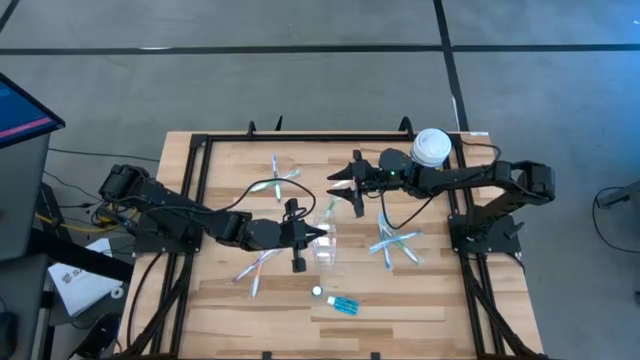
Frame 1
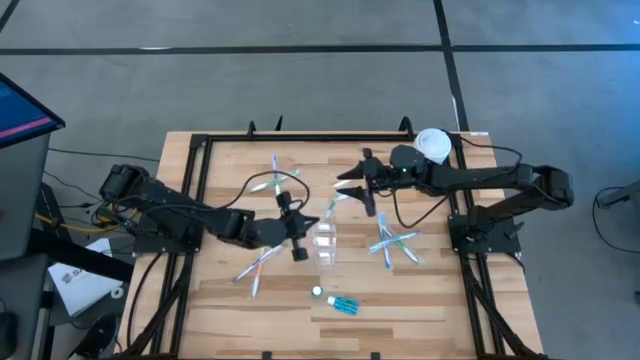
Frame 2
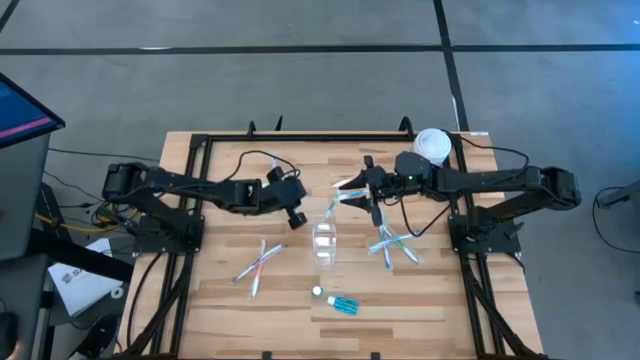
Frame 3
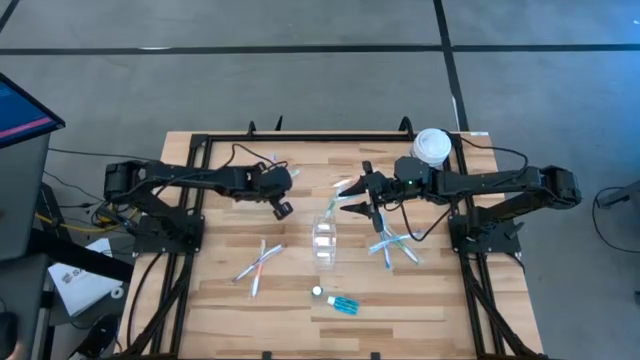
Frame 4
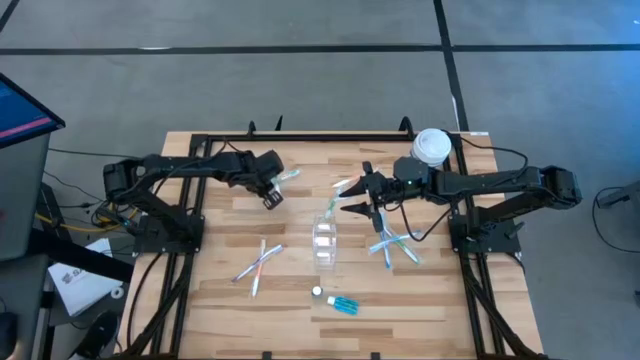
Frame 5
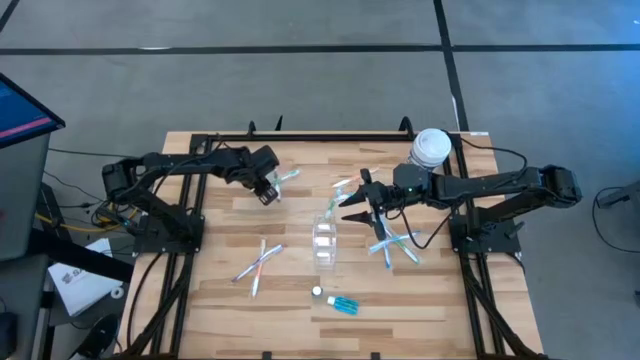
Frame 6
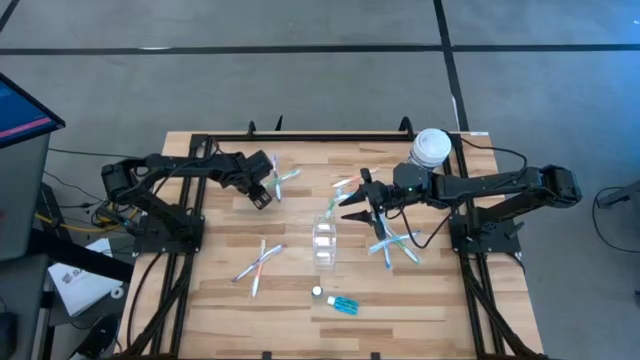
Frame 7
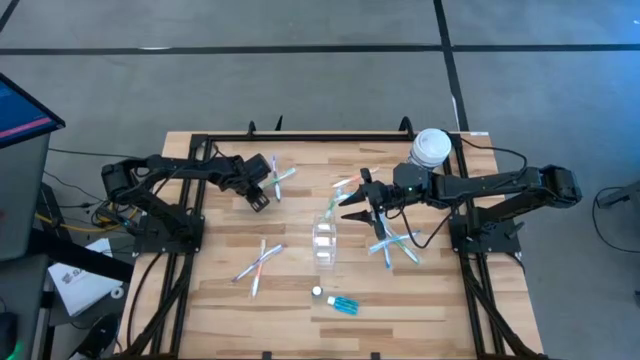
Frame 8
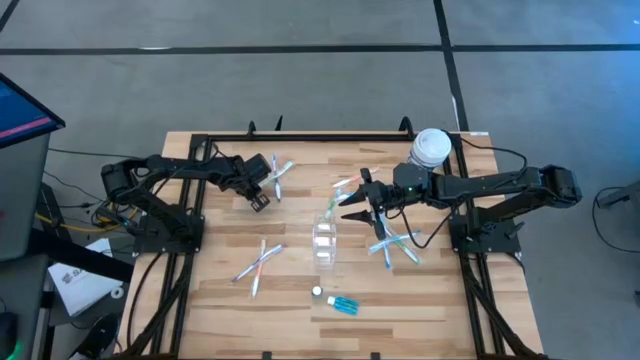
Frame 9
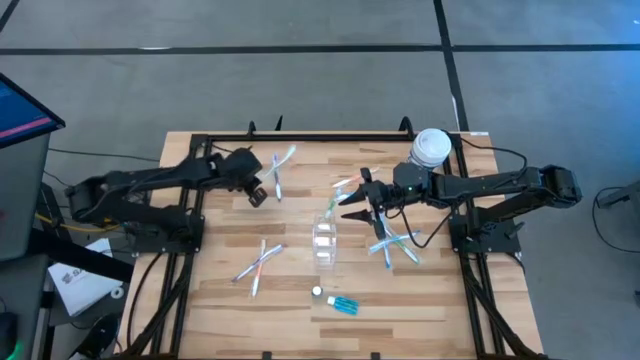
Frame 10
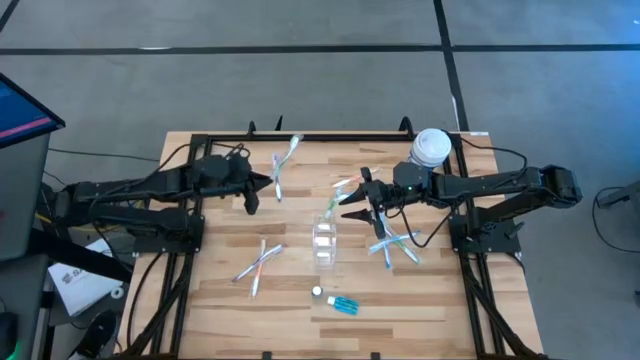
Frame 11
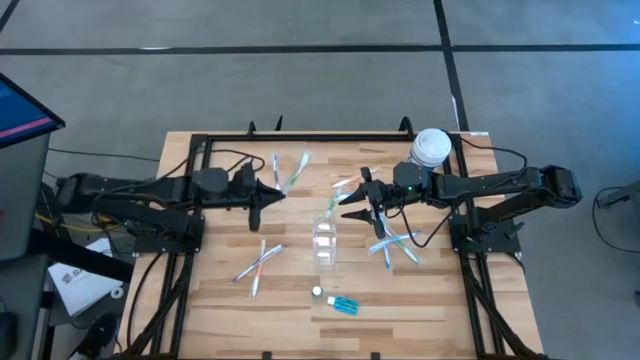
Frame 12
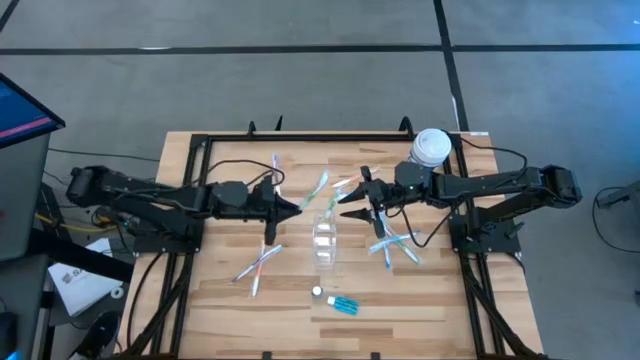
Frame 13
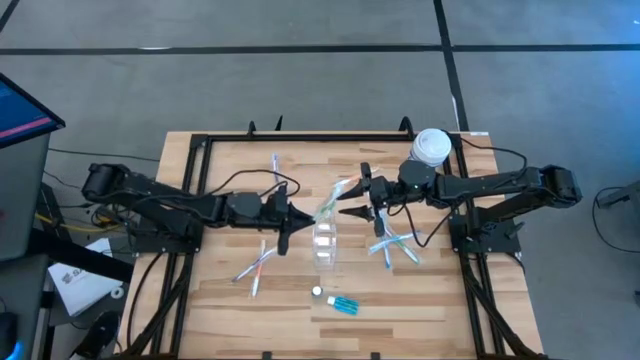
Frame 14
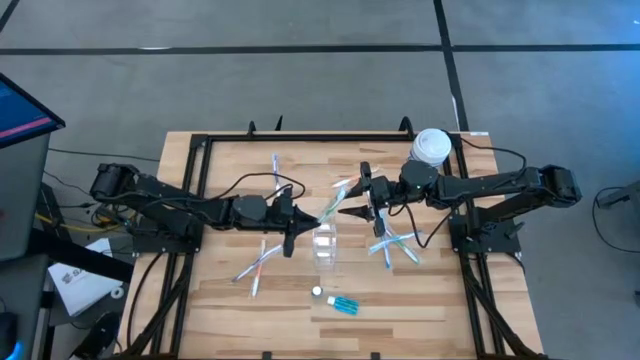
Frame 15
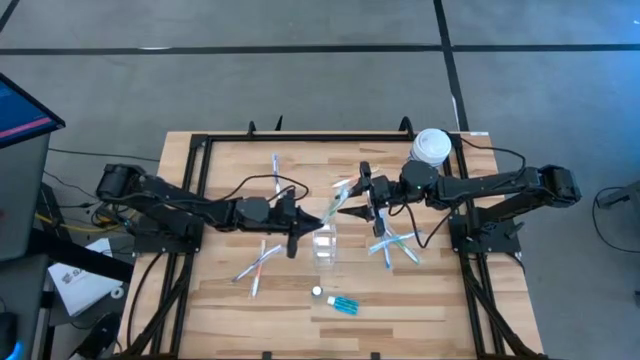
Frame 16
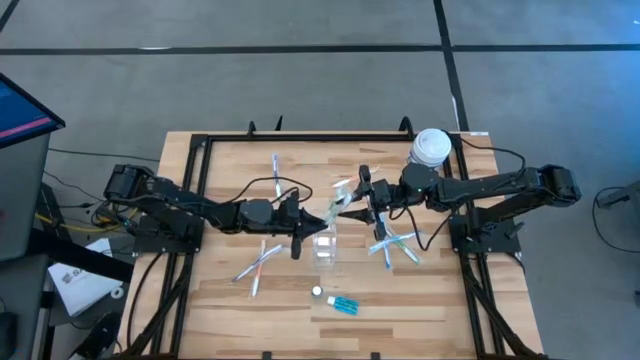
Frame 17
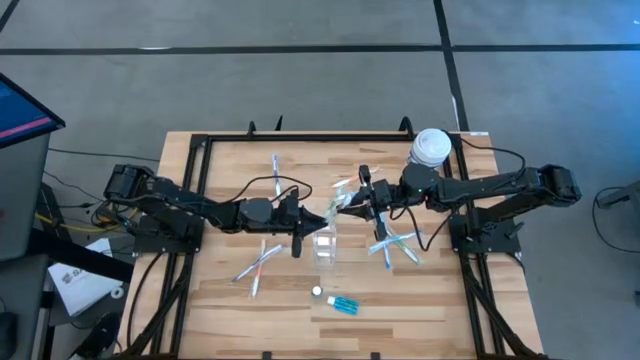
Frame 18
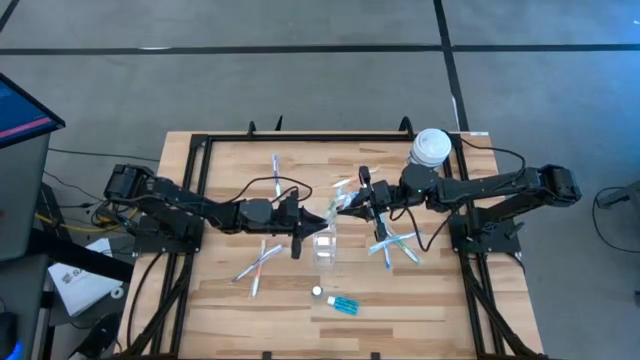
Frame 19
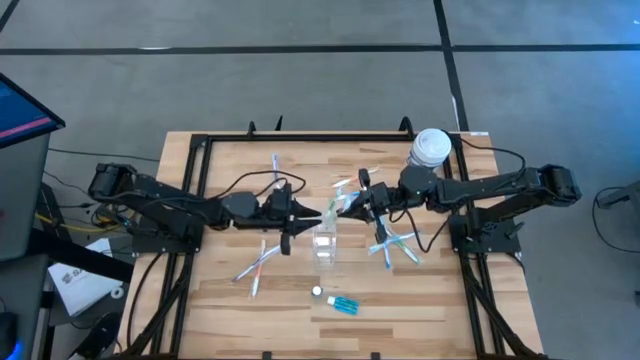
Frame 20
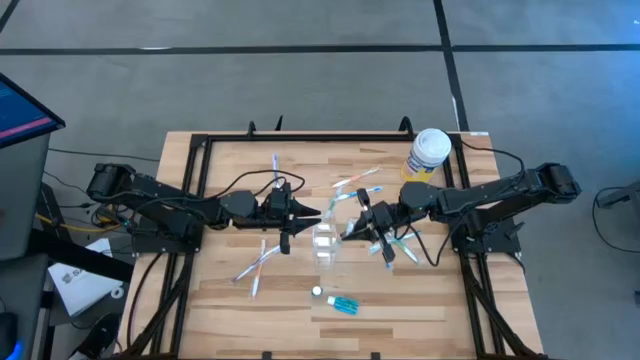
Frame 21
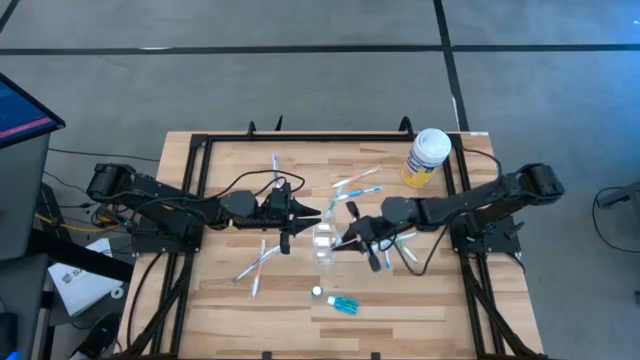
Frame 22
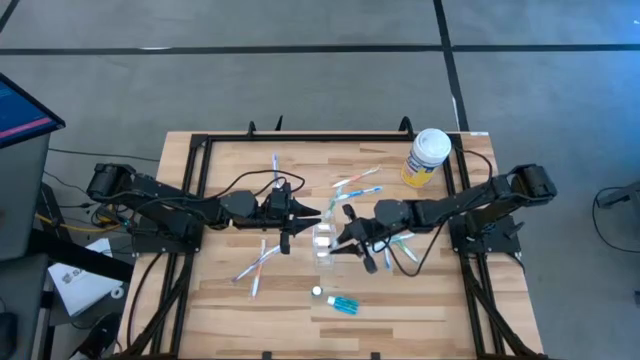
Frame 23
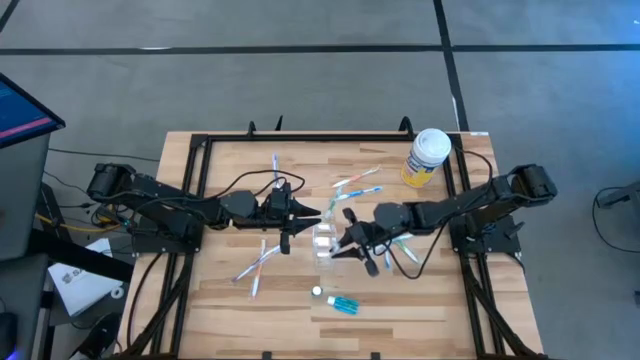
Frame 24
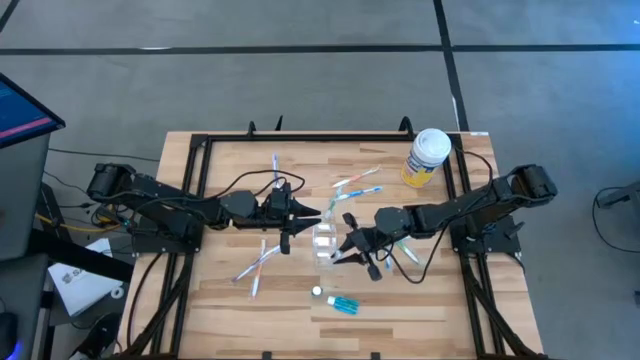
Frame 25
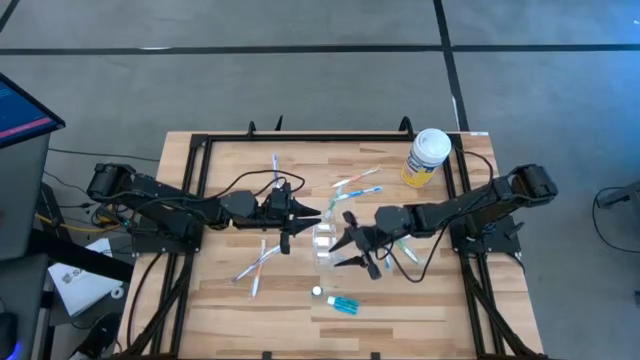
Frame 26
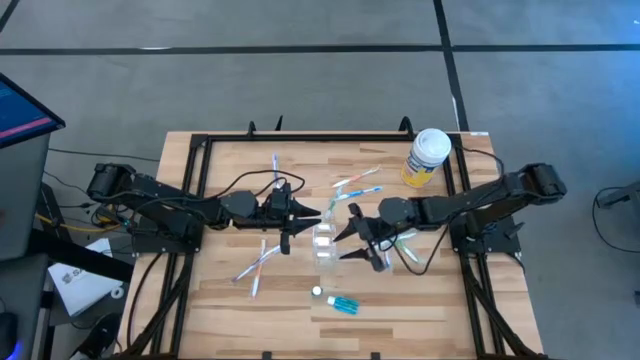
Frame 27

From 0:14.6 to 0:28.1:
Task: Pick & Place toothbrushing station
Put the top green toothbrush into the transparent organizer

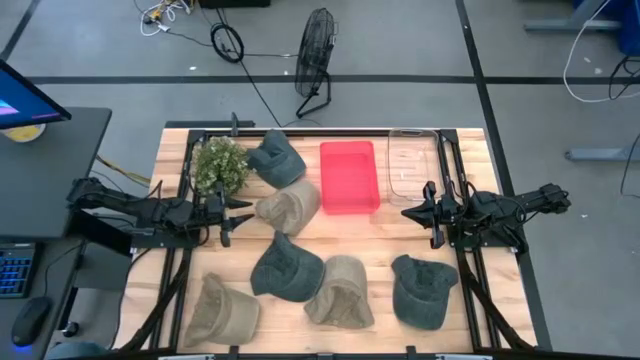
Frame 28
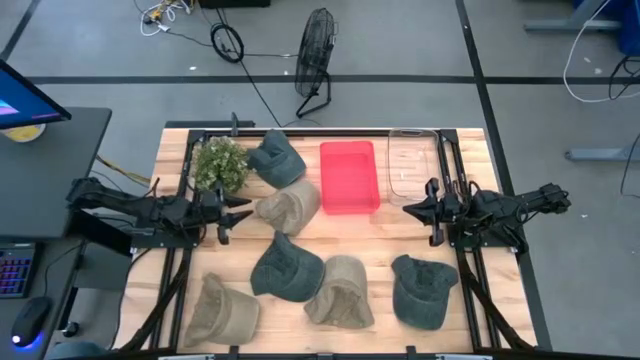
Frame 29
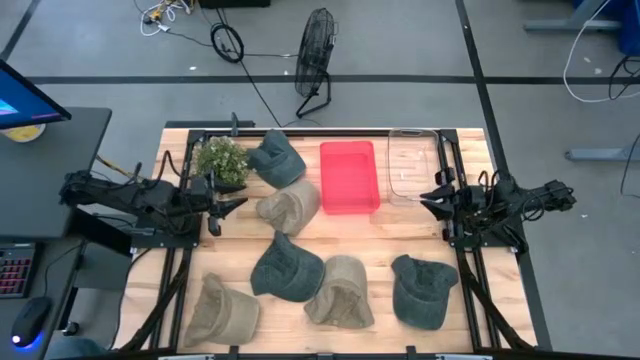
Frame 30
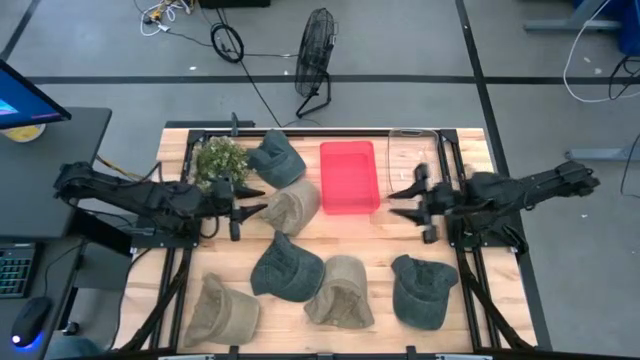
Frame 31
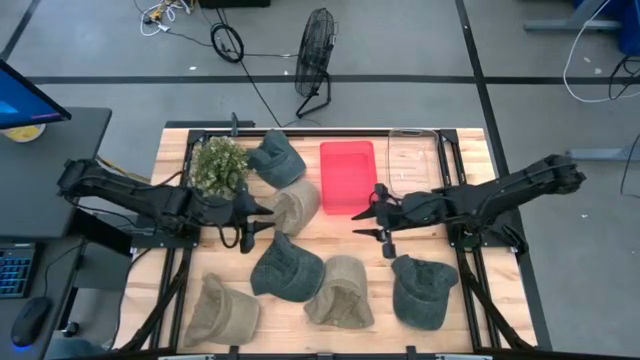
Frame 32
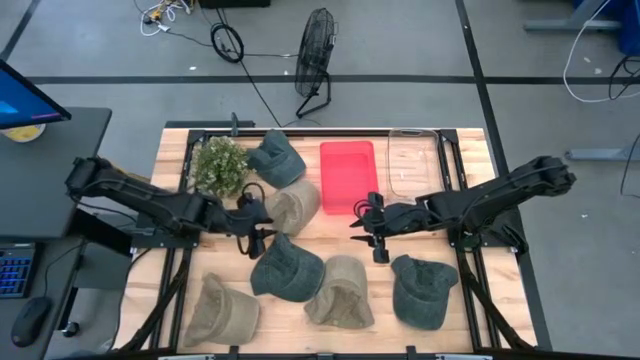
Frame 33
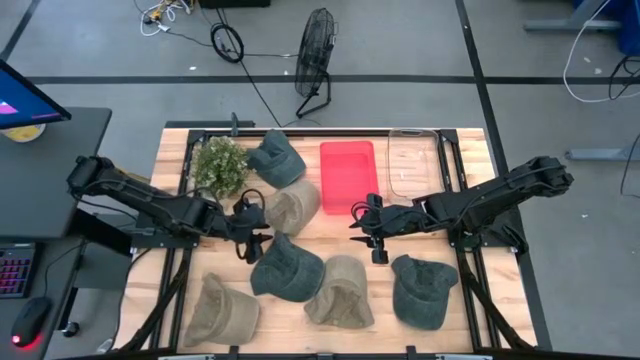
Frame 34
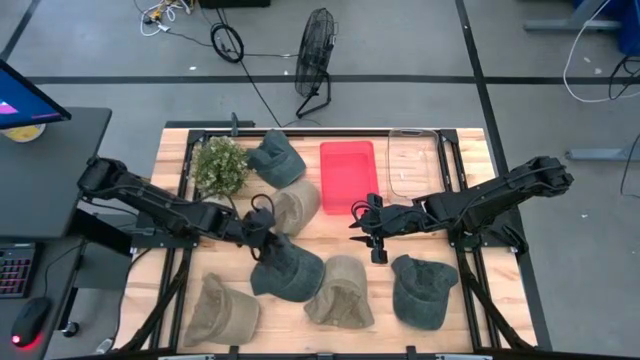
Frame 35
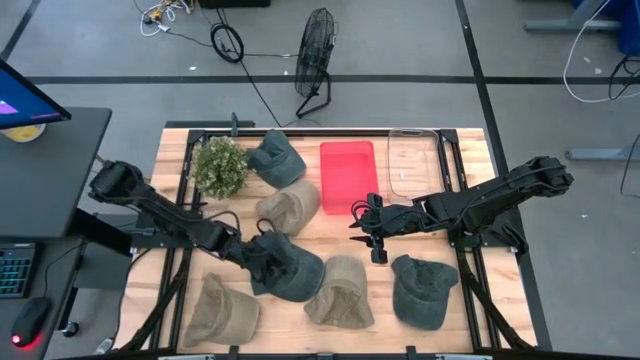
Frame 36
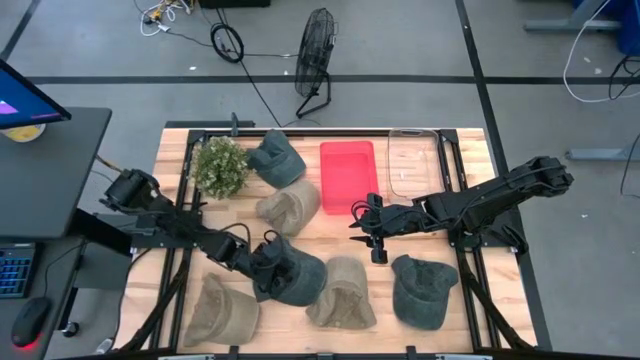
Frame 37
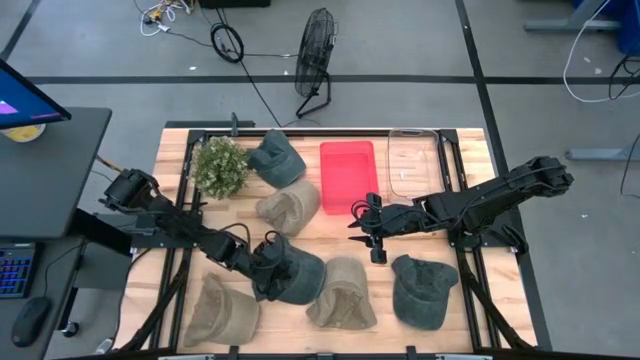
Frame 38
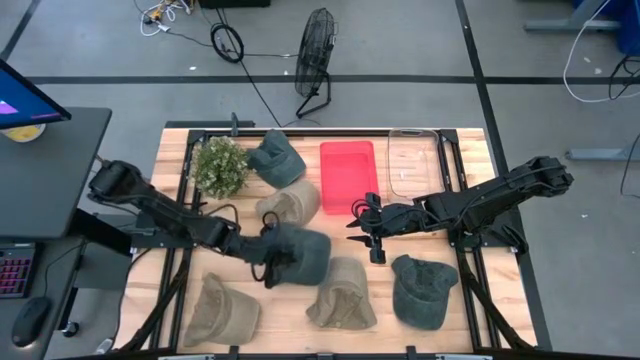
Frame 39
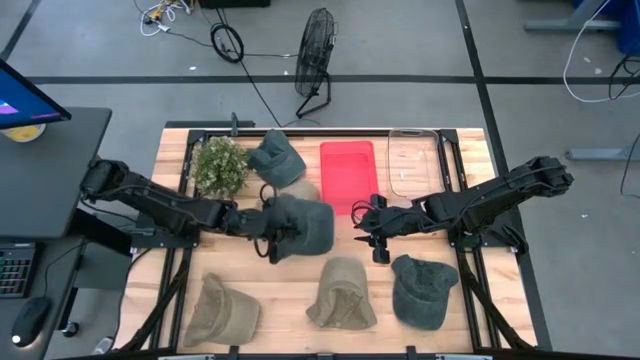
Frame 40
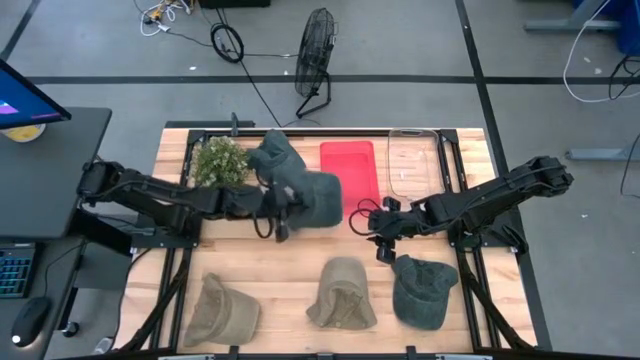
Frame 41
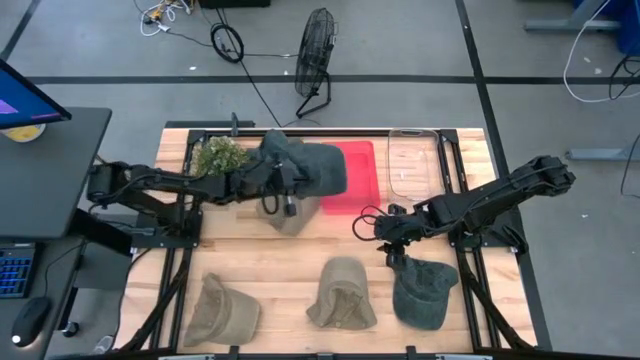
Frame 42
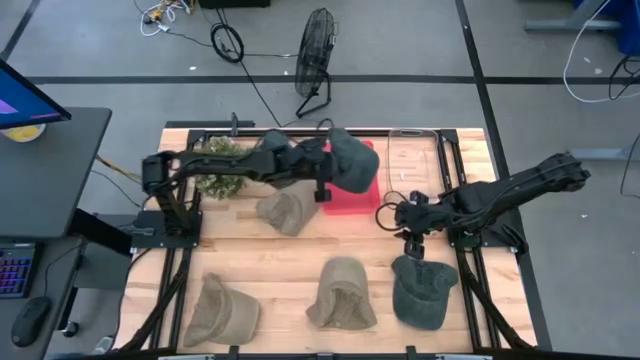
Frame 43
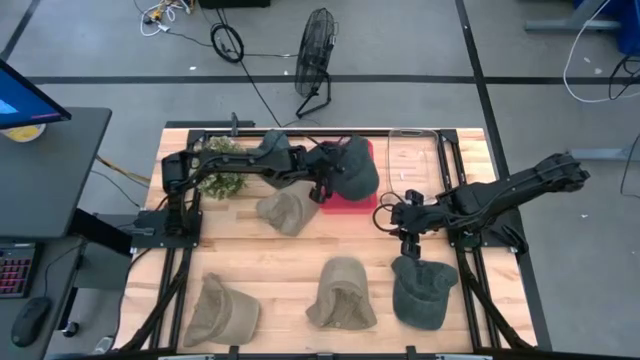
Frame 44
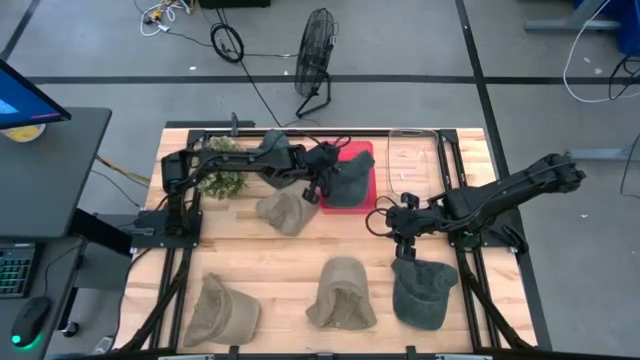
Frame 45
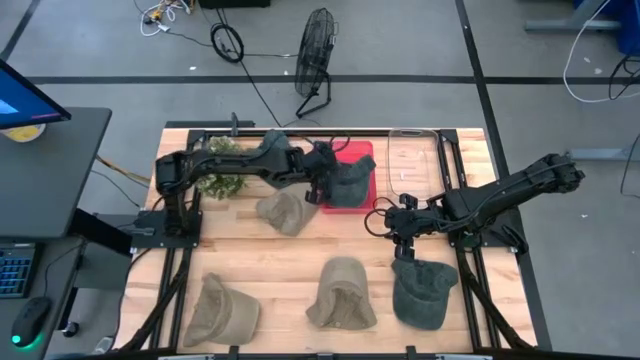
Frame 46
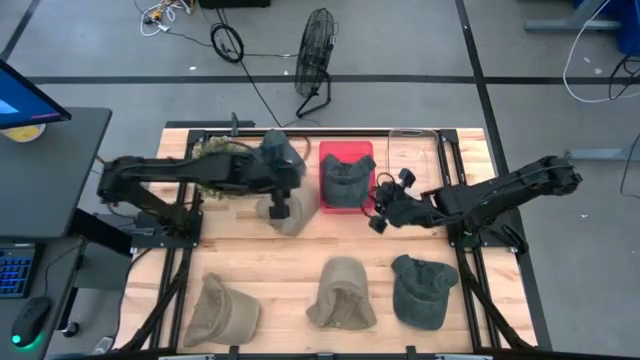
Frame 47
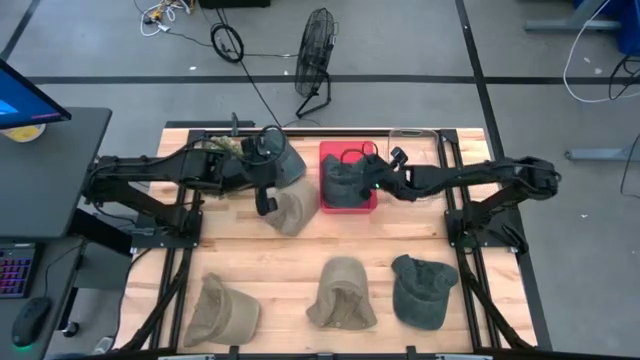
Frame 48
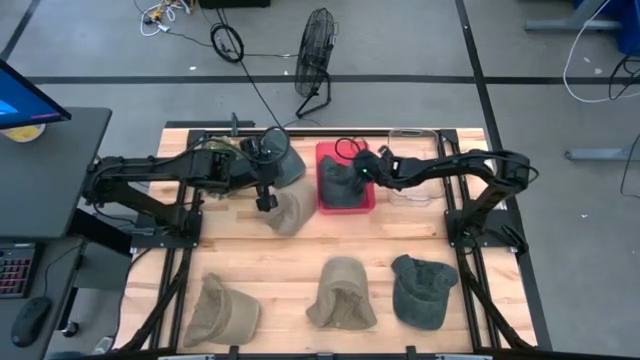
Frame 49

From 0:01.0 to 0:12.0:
Task: Pick & Place hat
Put the bottom left black cap into the pink bin
